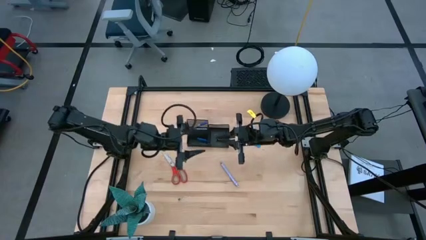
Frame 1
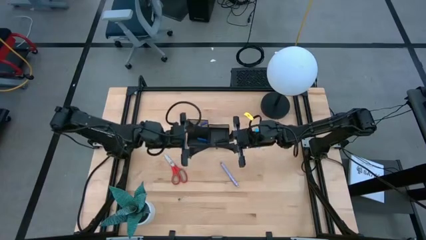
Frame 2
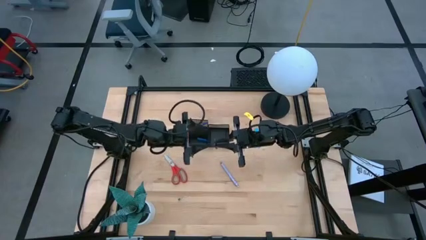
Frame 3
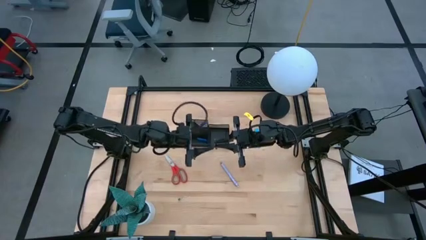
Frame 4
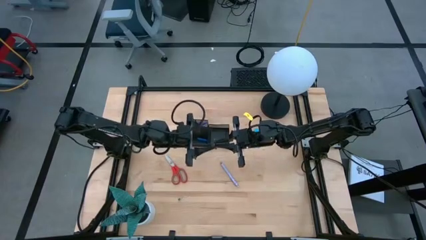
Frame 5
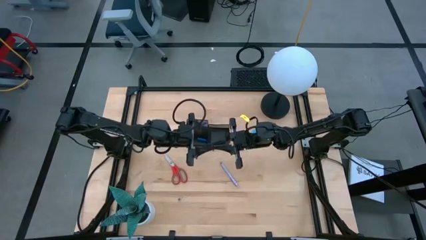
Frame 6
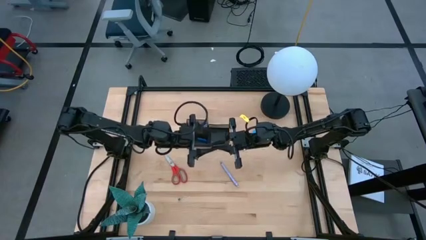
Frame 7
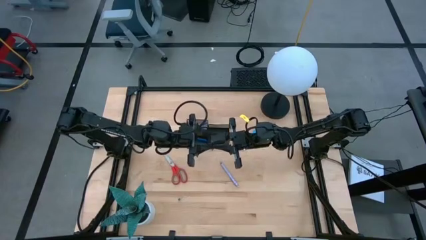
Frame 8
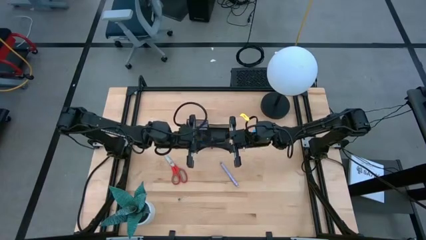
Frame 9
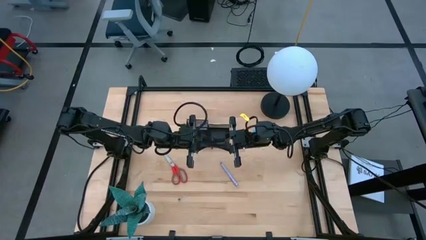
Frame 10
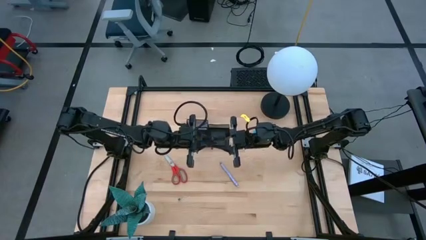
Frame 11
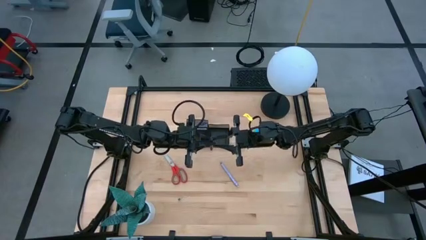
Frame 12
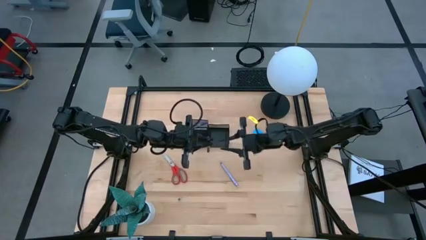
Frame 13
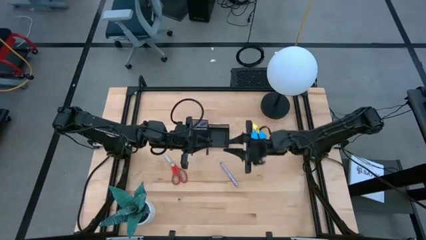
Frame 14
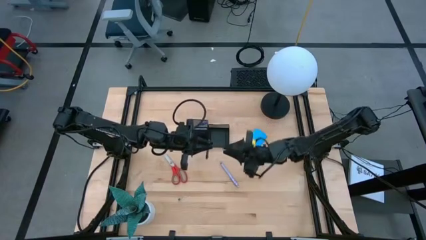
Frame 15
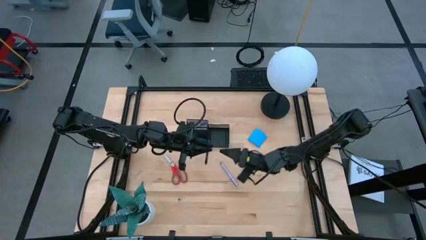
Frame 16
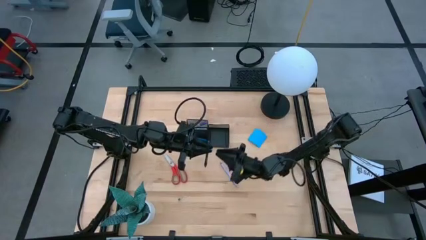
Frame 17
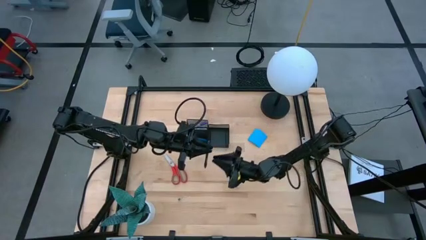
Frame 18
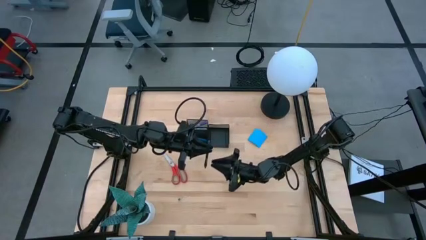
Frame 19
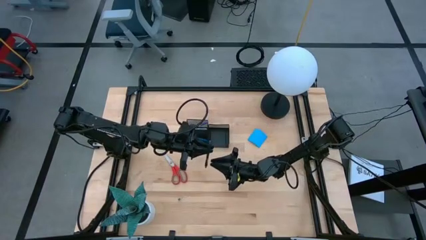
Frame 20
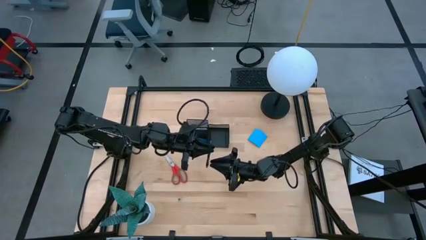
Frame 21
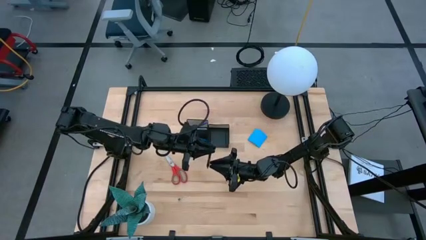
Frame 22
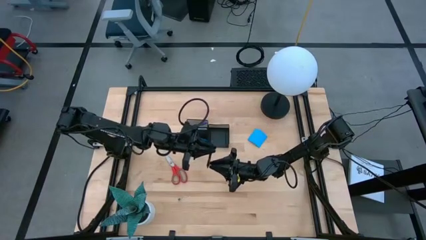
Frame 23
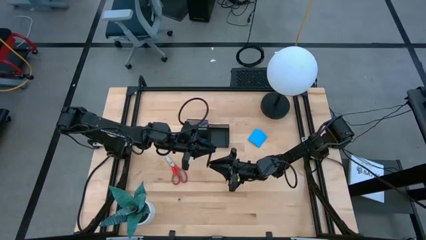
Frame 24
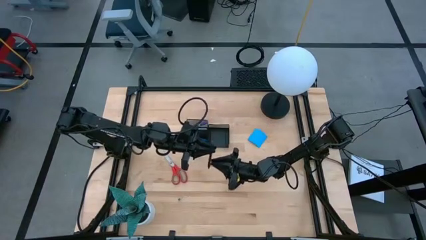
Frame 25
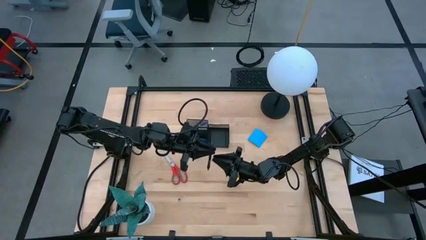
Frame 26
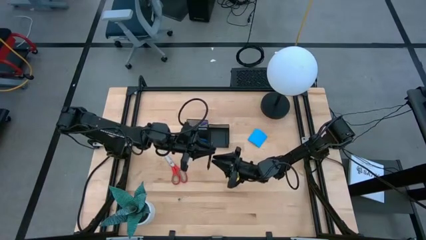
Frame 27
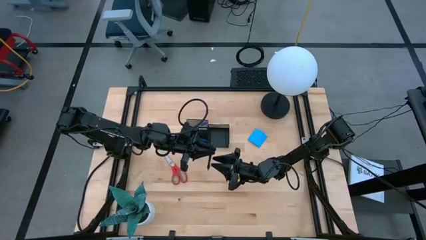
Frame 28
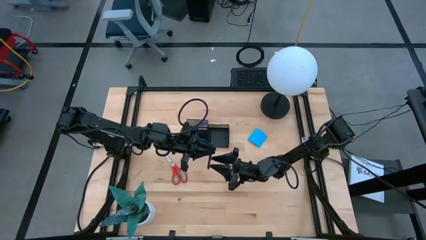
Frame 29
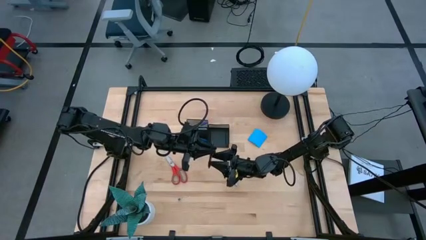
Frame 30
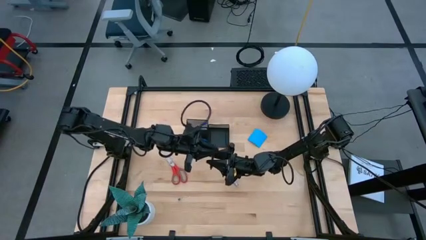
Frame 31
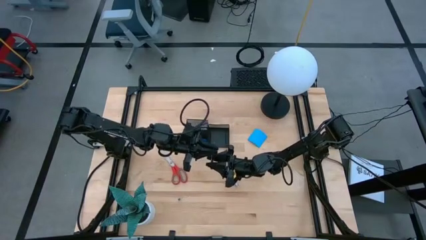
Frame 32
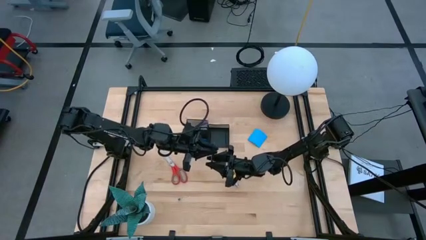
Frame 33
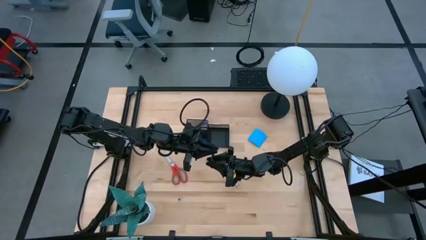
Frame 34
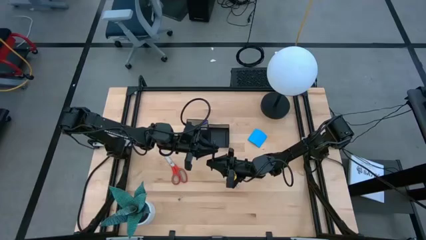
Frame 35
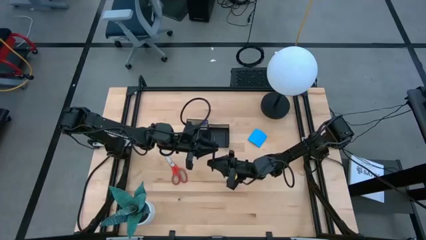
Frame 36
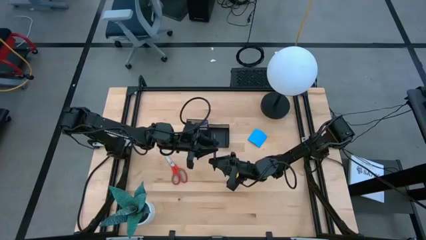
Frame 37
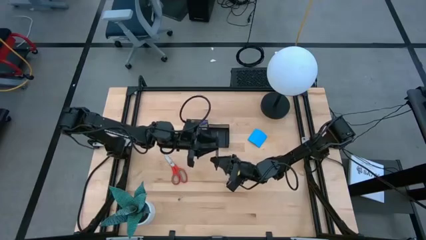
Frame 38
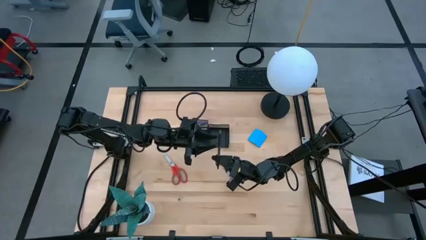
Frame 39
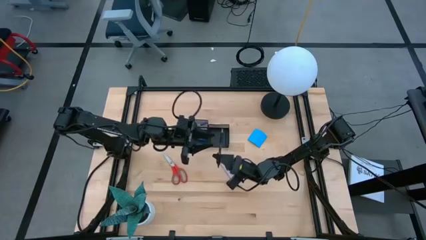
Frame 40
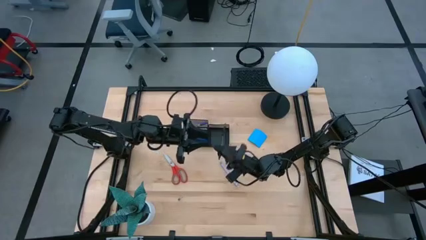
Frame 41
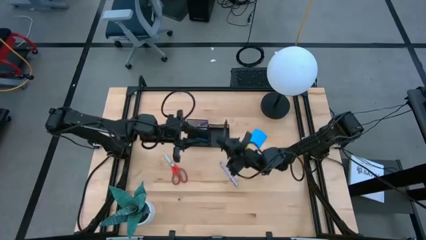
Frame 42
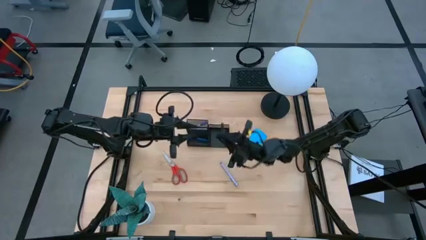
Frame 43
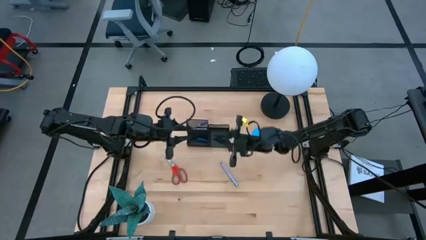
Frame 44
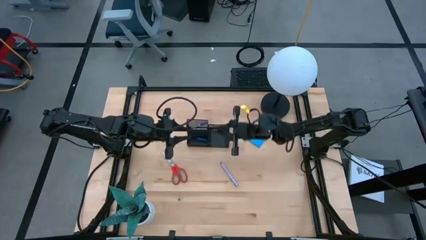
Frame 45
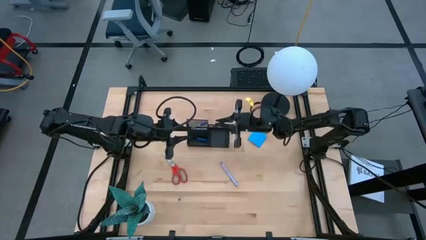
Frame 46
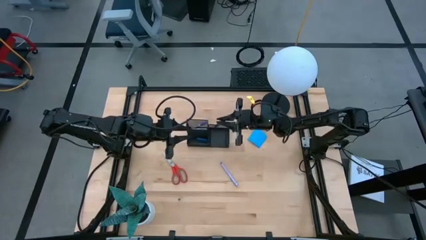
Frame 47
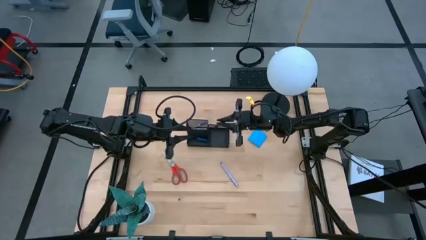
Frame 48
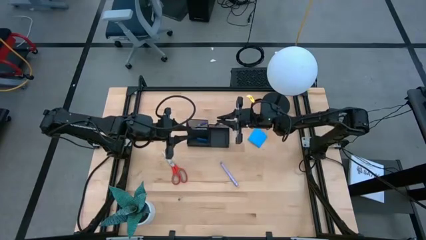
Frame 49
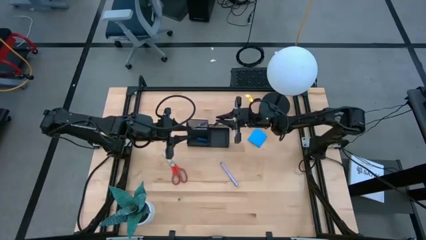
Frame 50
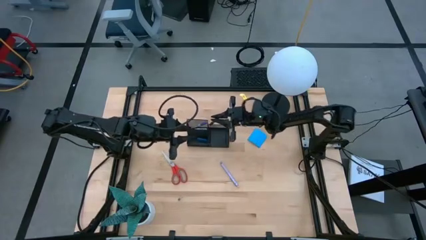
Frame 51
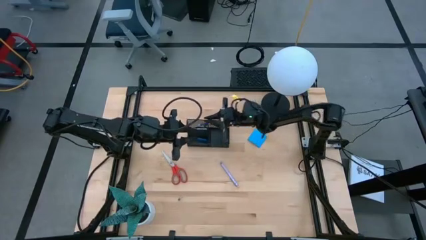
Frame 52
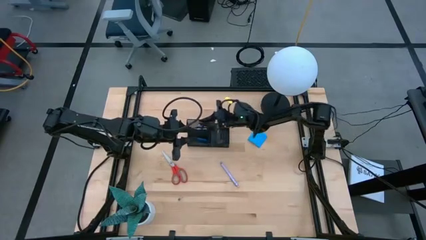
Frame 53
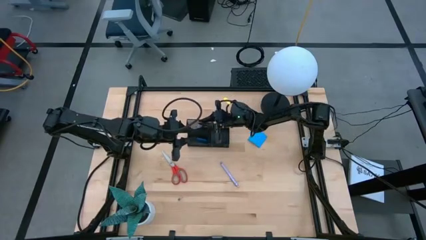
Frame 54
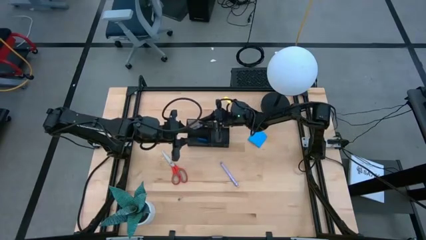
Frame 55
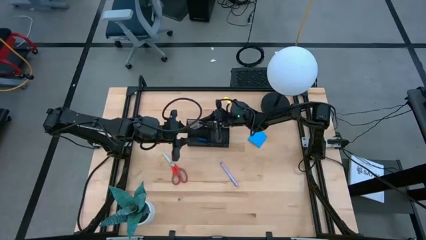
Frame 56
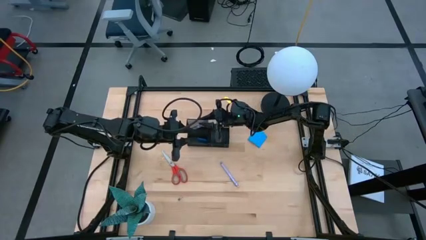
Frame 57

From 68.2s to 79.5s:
Task: Pick and place office supplies into organizer
Put the black pen into the desk organizer

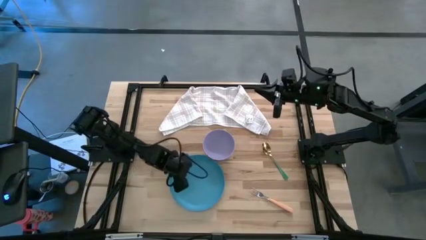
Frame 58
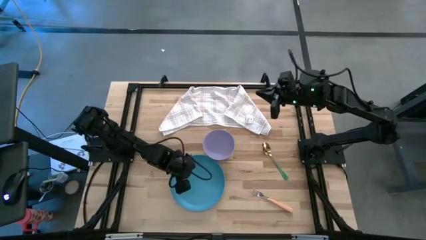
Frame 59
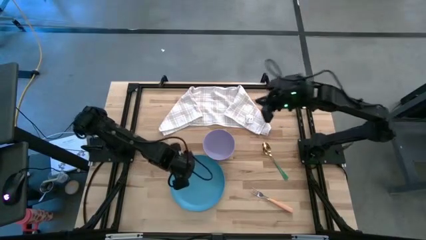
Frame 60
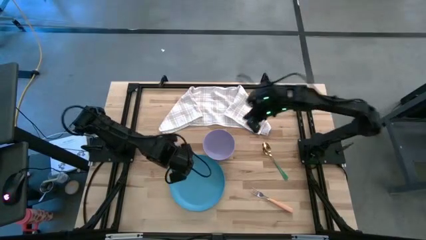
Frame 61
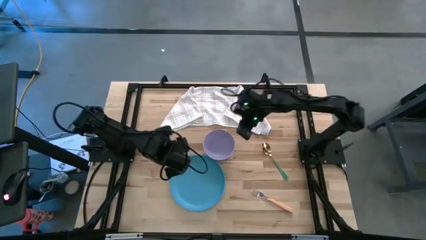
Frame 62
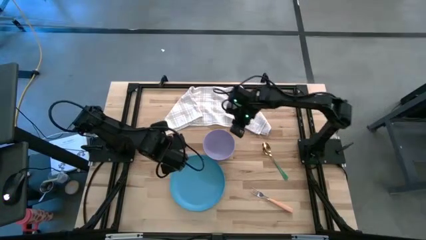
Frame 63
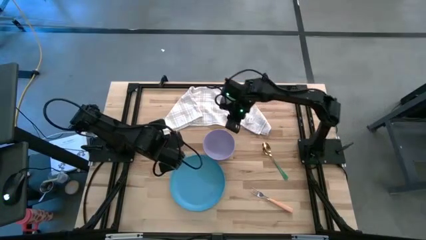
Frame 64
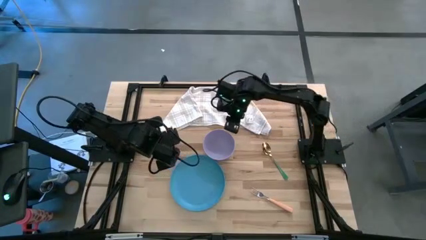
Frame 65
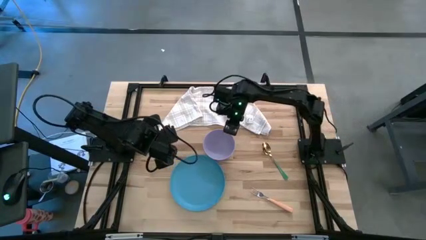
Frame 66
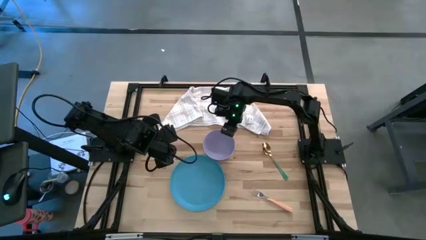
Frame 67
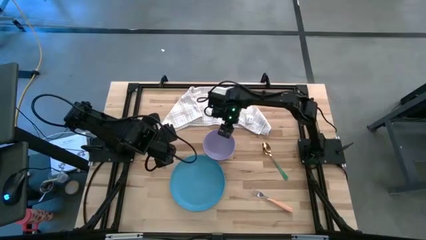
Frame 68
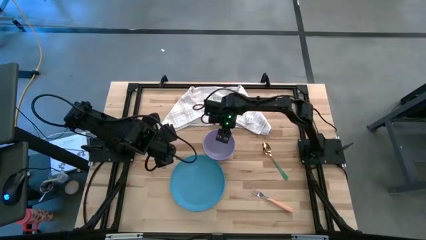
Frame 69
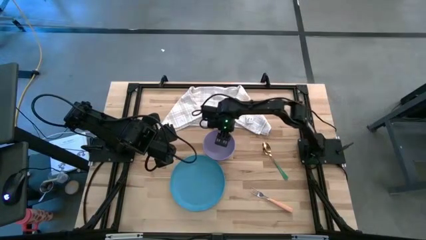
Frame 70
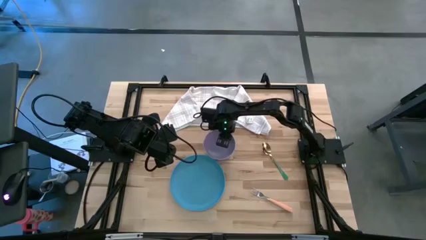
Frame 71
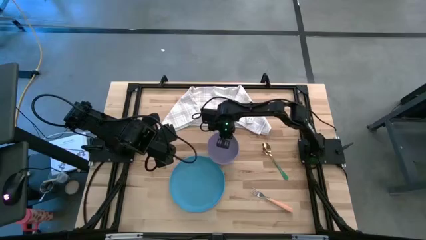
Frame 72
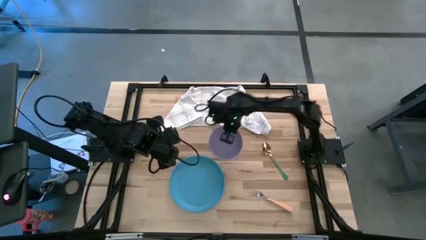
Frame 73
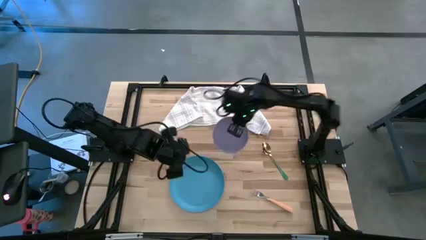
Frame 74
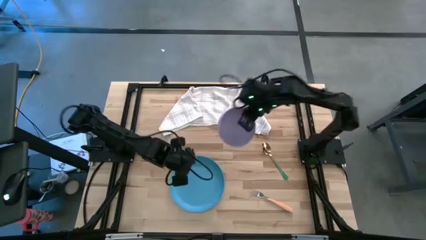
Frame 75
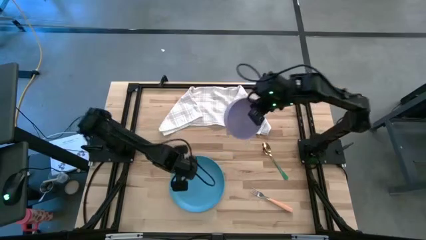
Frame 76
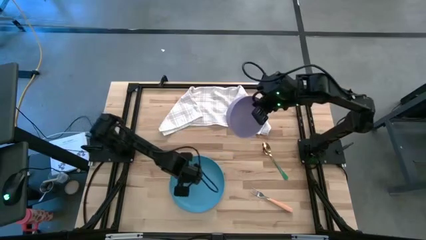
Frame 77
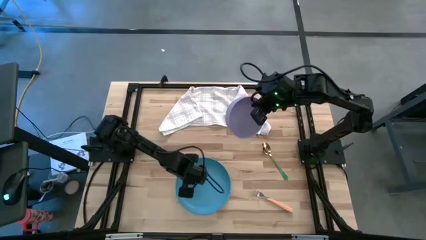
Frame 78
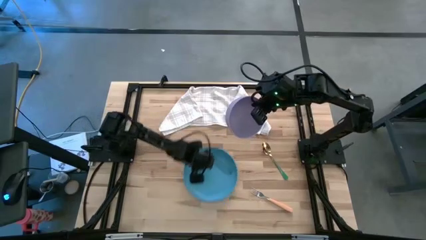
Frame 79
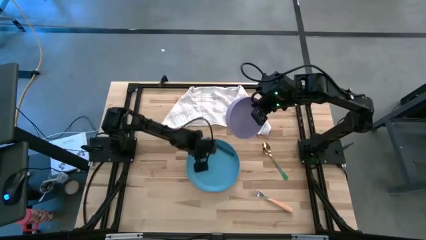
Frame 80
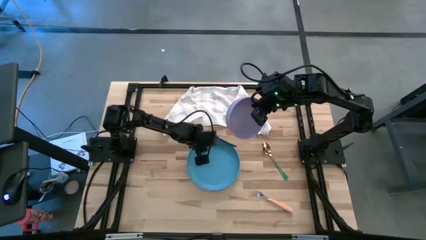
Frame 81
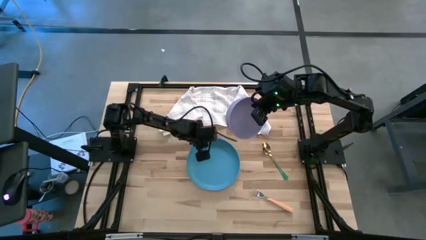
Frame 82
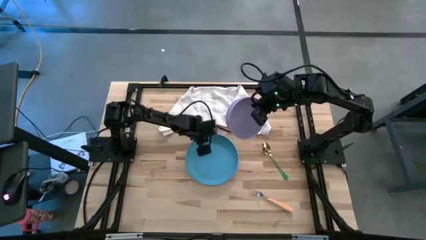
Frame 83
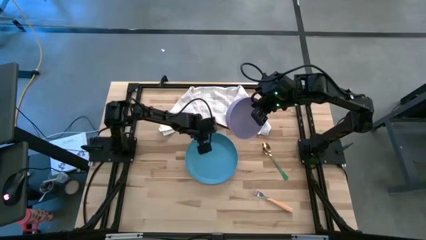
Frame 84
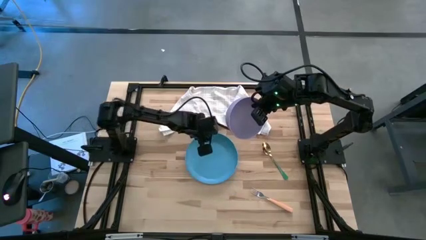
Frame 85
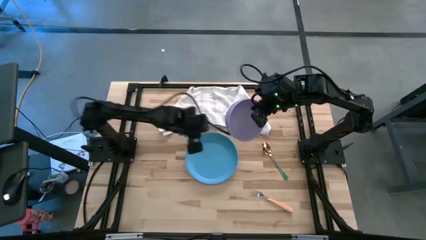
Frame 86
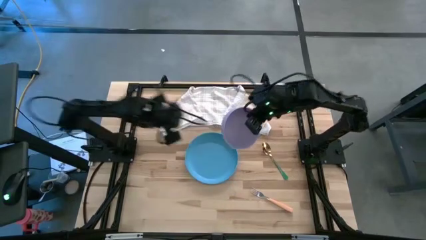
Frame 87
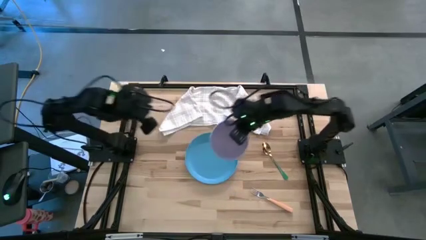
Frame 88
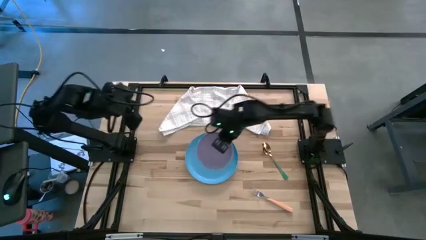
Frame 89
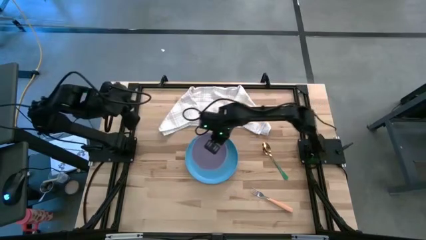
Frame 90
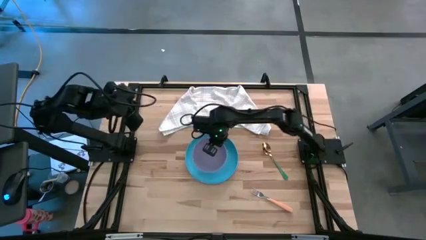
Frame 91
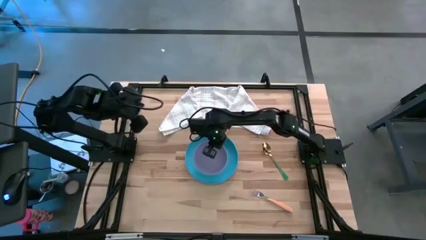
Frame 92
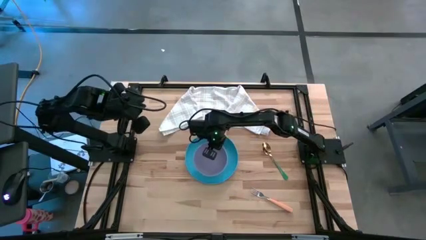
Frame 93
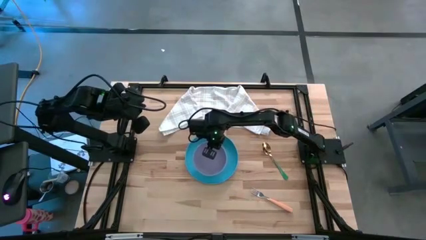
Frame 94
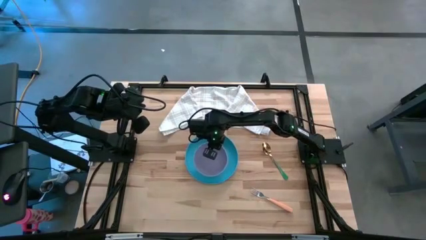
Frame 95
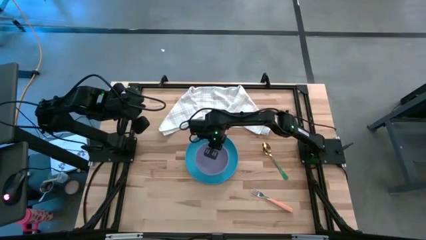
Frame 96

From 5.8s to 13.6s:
Task: Set table place
Put the purple bowl on top of the blue plate
